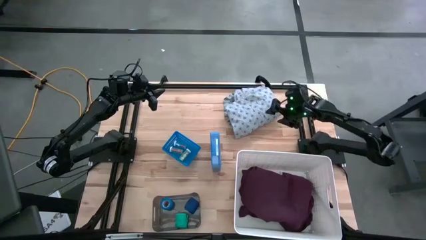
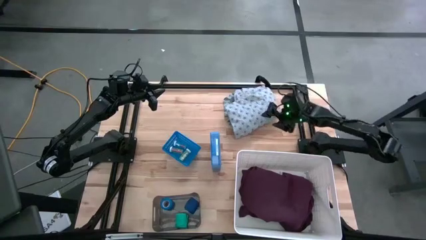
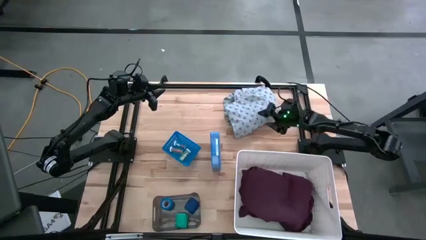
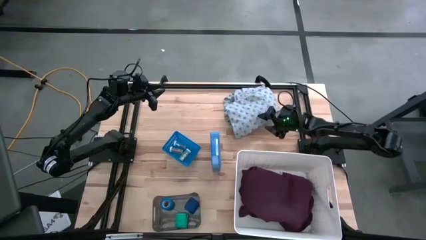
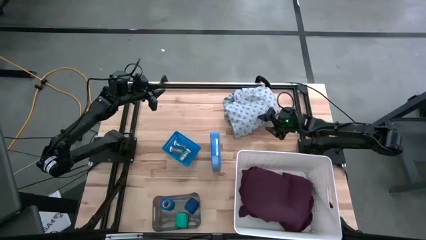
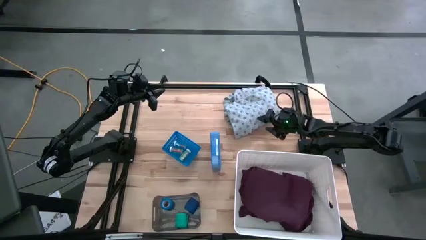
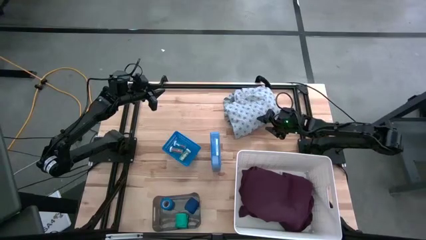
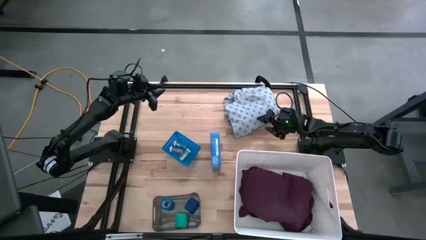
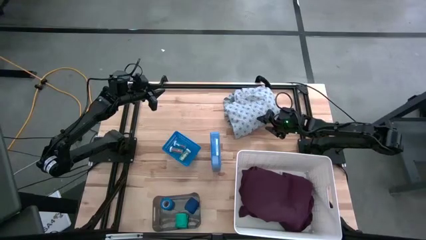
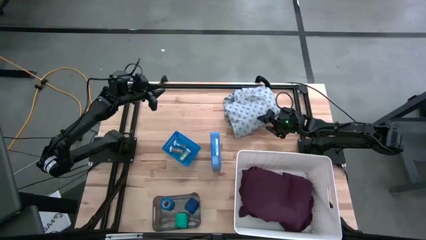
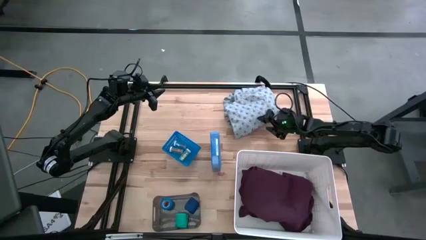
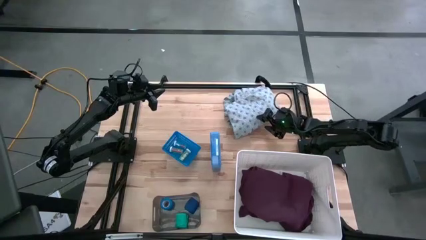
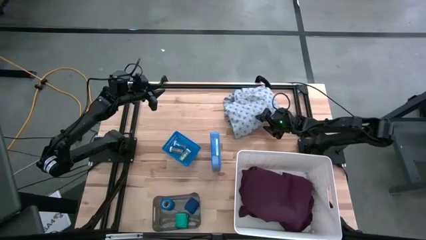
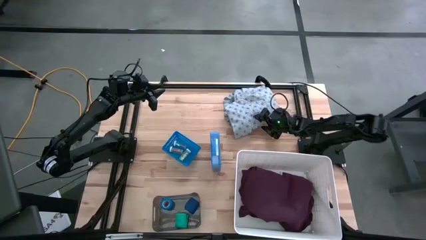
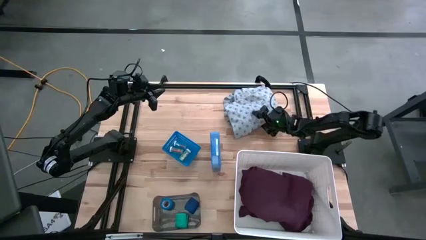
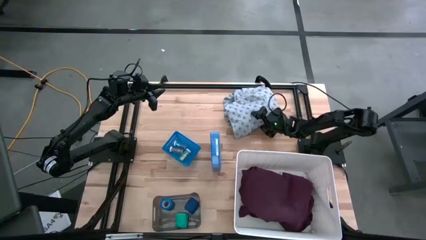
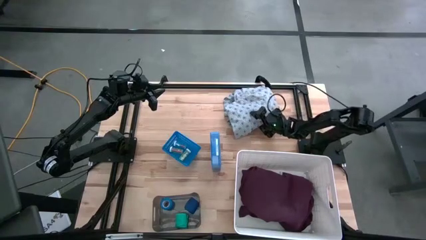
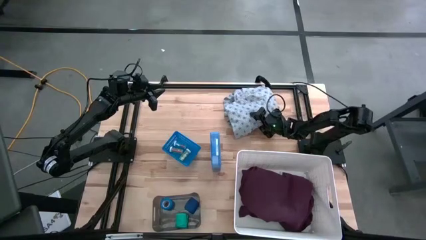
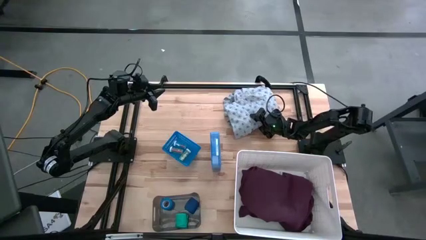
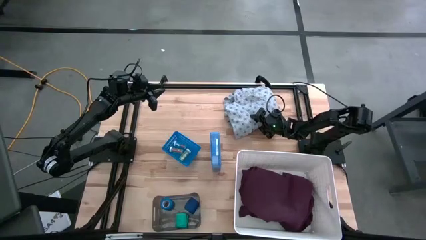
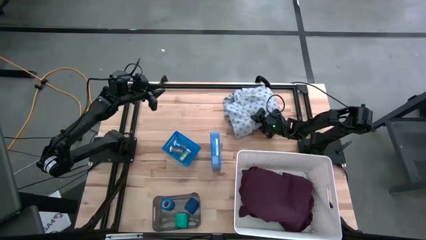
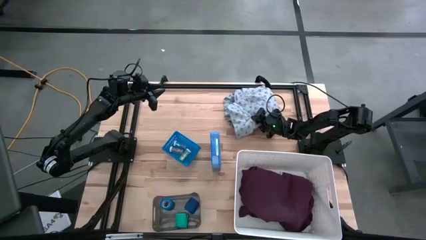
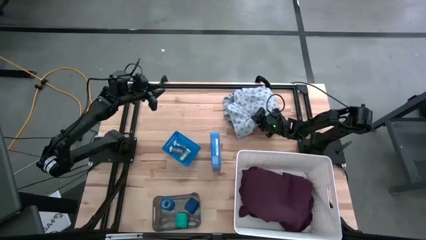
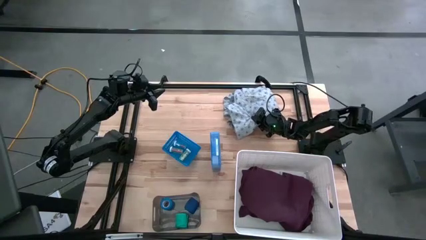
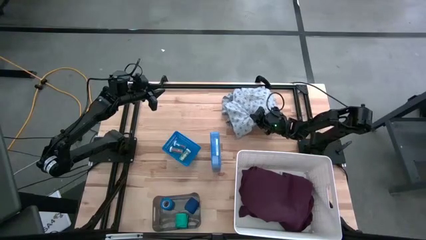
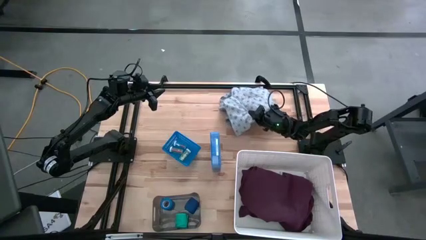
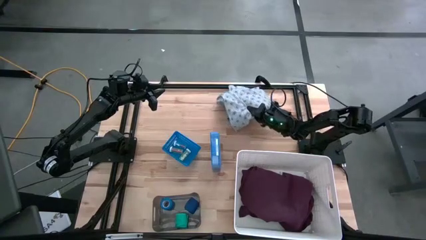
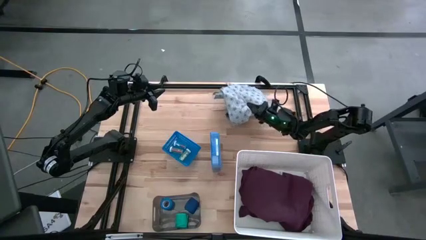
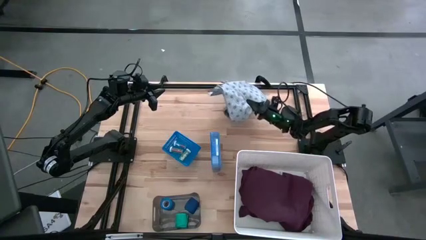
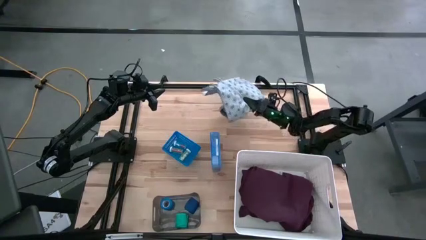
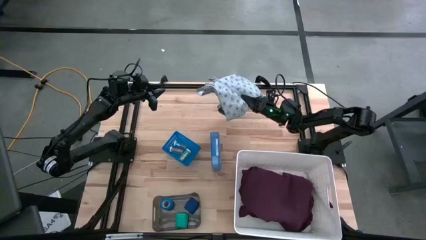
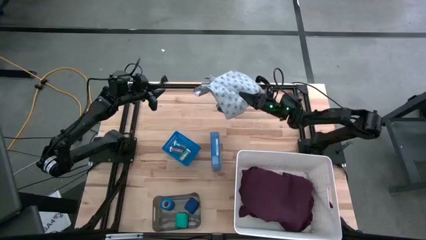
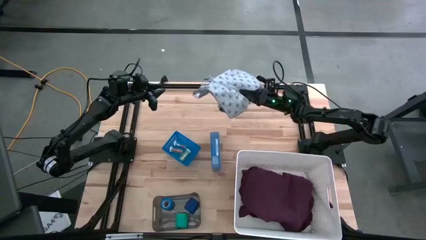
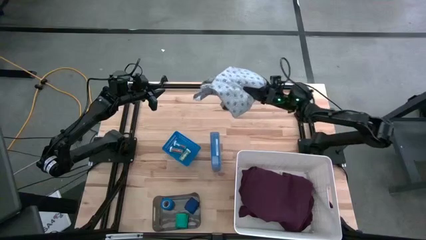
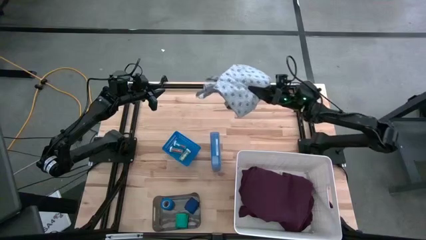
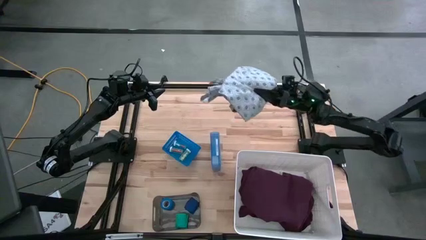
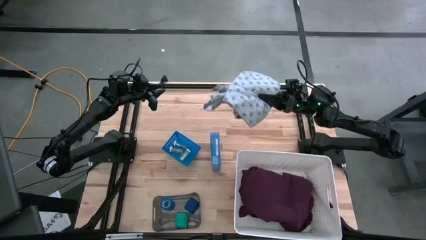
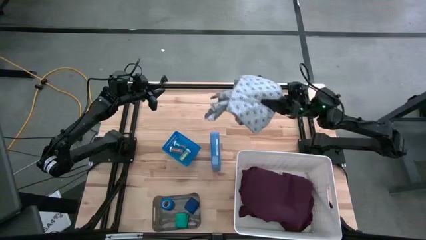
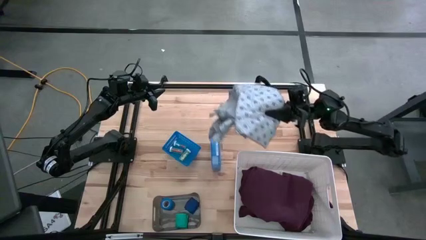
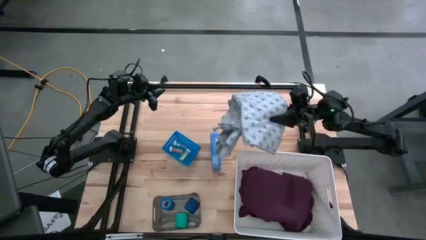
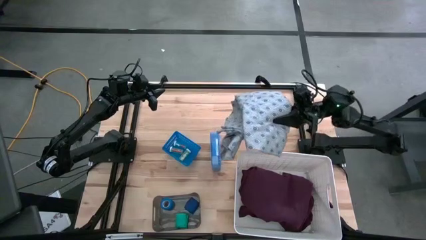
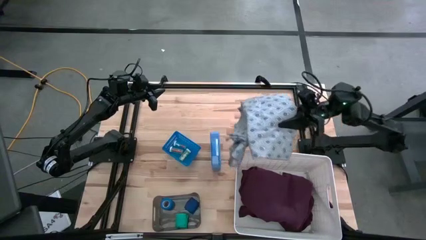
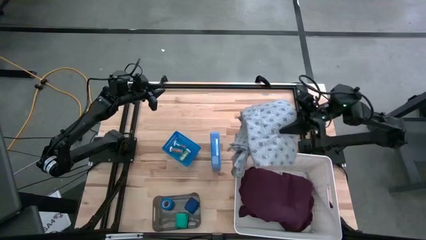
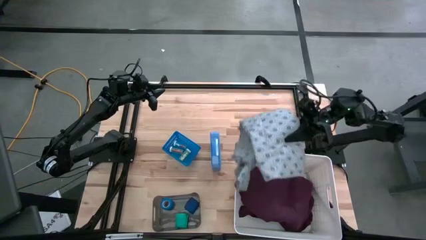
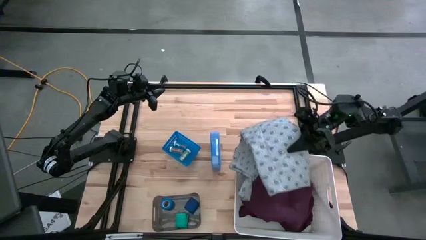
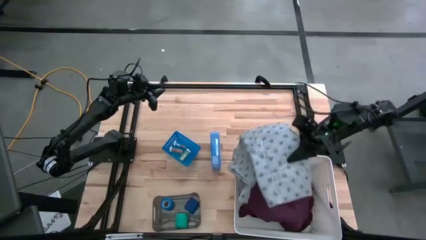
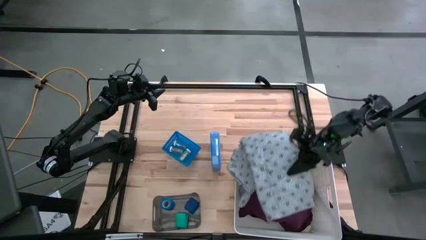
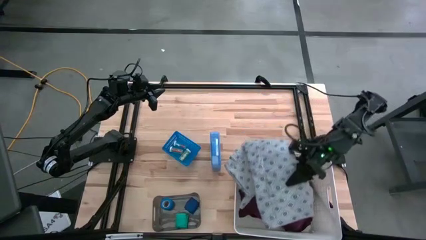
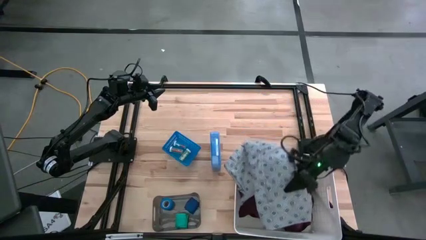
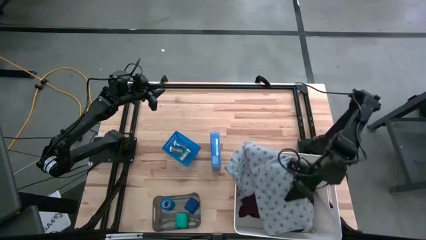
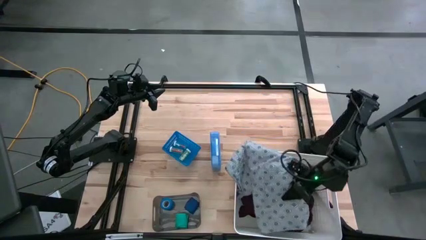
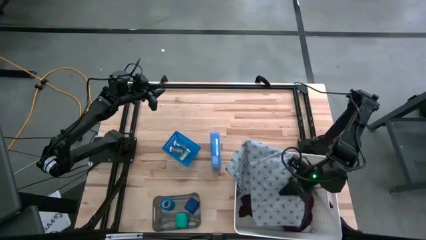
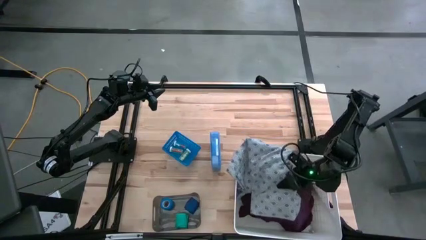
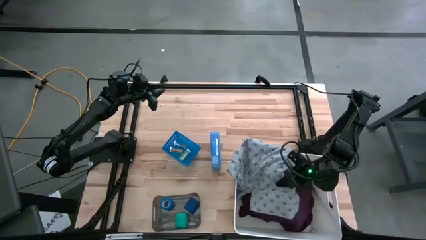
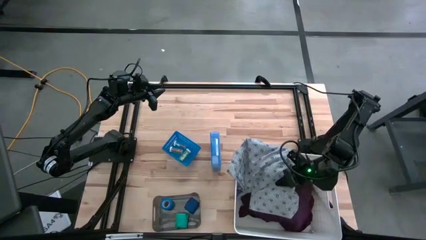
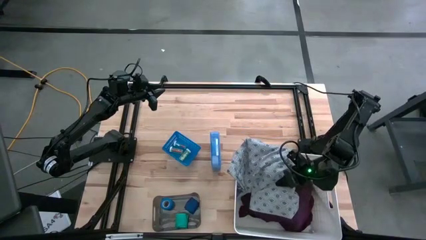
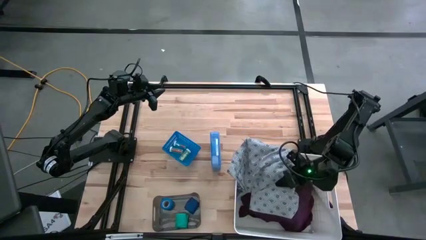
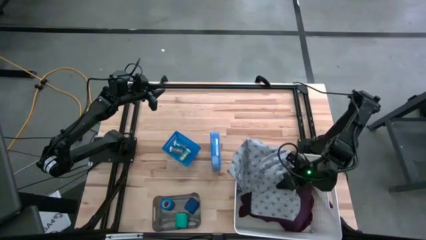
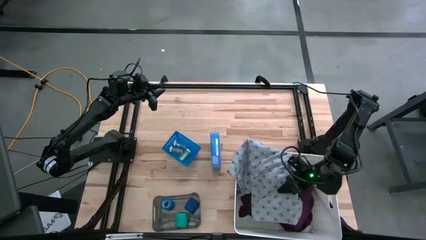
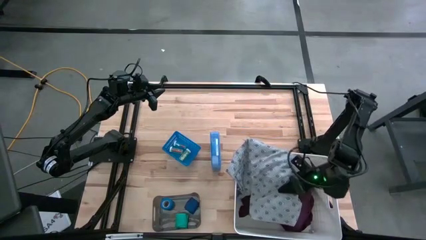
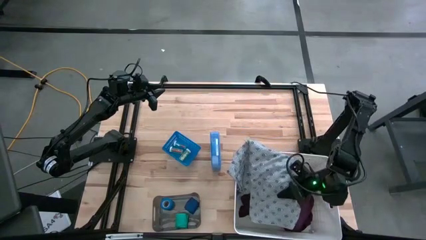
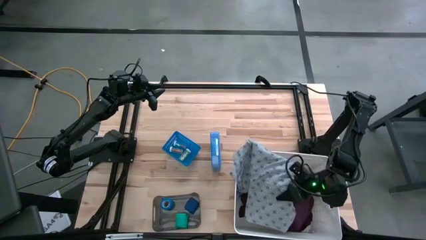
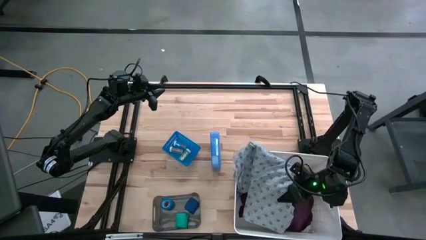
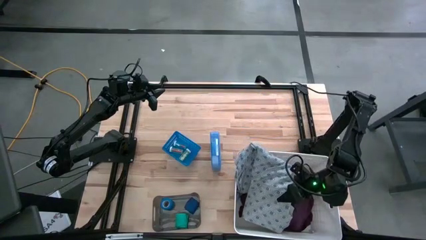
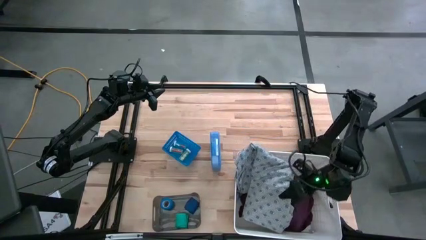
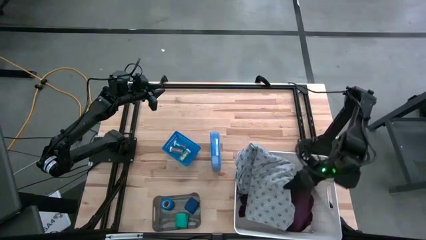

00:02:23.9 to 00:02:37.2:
Task: Pick & Place Medicine items
Put the blue patient gown into the white bin
